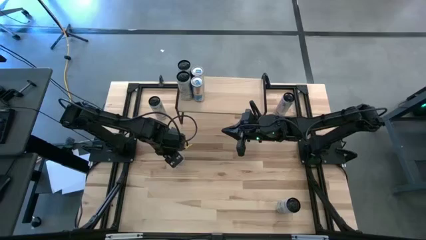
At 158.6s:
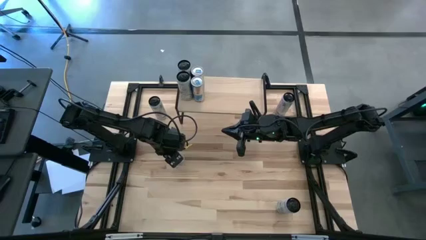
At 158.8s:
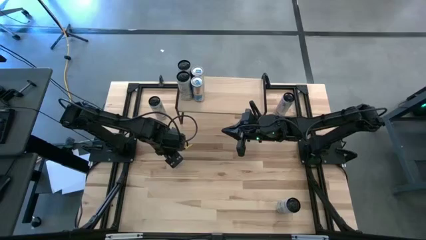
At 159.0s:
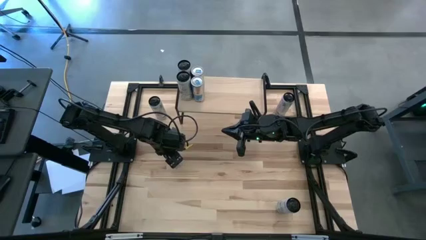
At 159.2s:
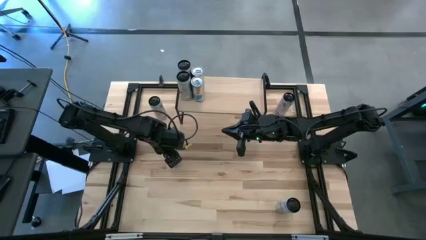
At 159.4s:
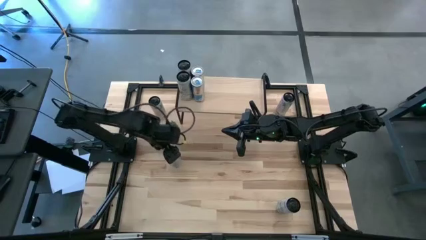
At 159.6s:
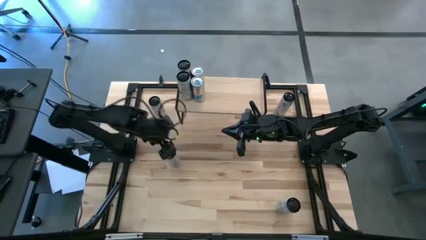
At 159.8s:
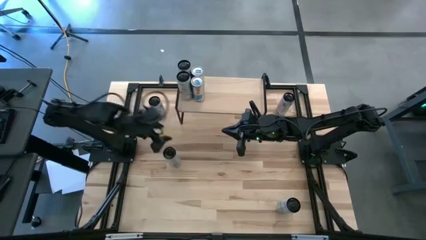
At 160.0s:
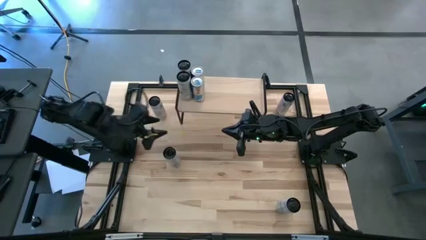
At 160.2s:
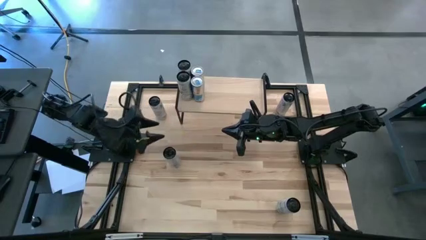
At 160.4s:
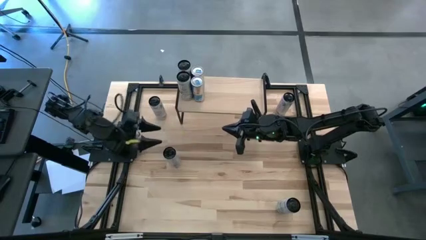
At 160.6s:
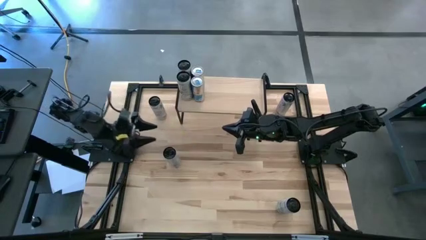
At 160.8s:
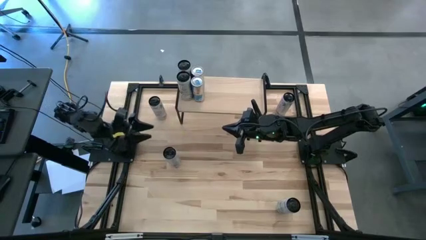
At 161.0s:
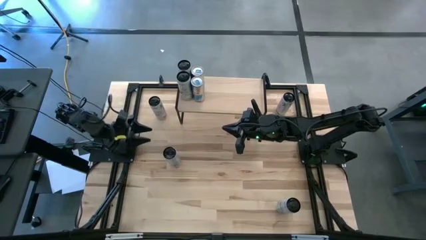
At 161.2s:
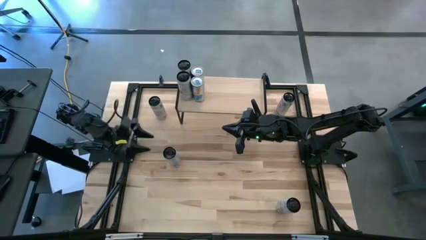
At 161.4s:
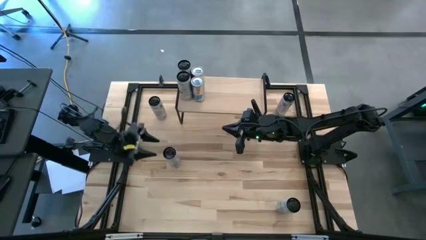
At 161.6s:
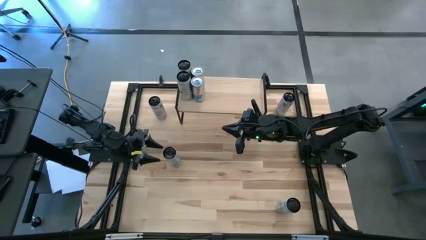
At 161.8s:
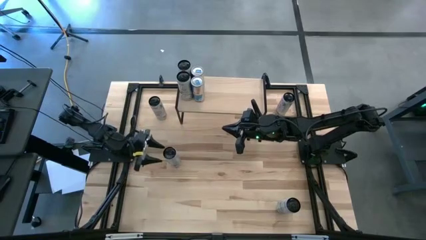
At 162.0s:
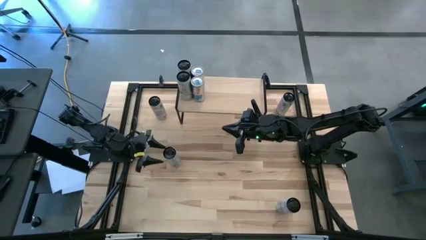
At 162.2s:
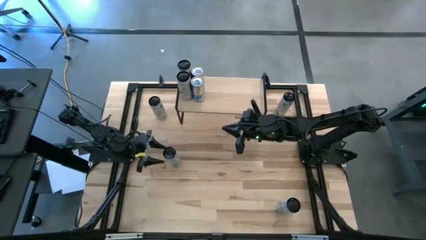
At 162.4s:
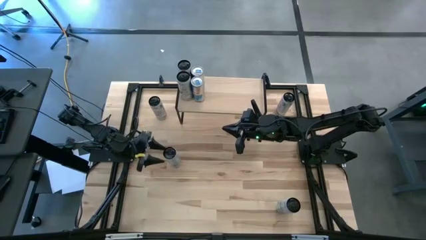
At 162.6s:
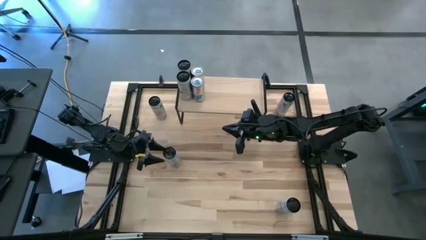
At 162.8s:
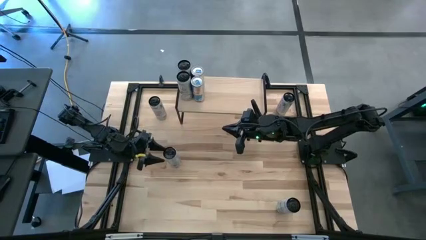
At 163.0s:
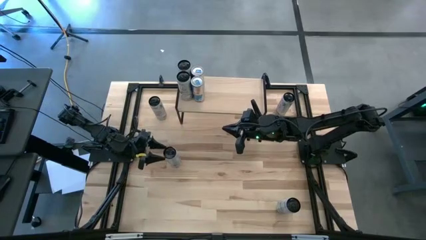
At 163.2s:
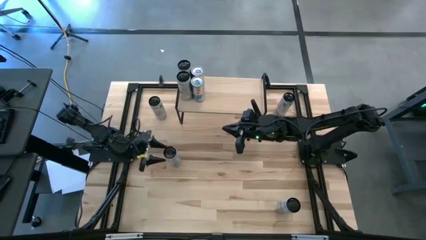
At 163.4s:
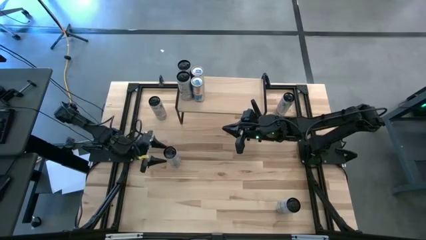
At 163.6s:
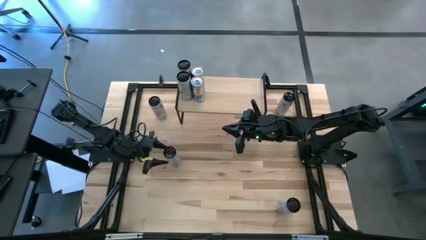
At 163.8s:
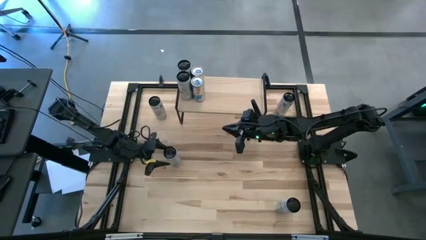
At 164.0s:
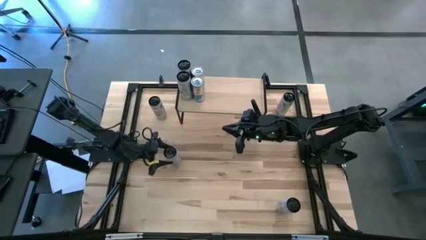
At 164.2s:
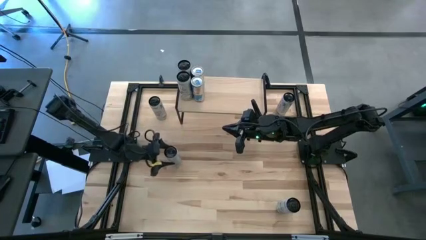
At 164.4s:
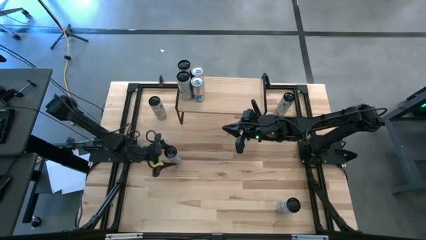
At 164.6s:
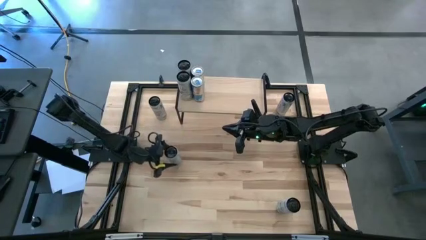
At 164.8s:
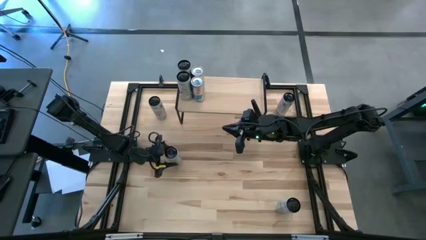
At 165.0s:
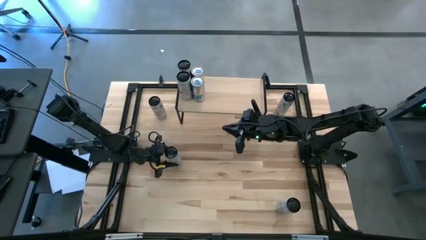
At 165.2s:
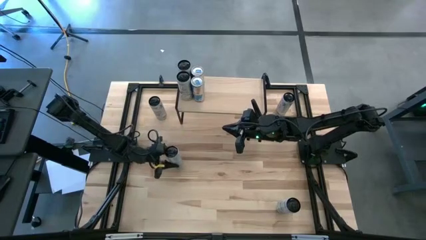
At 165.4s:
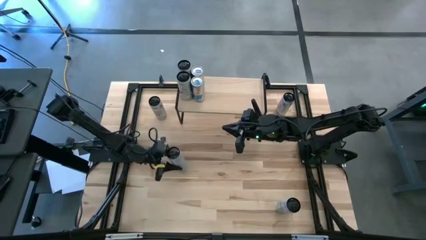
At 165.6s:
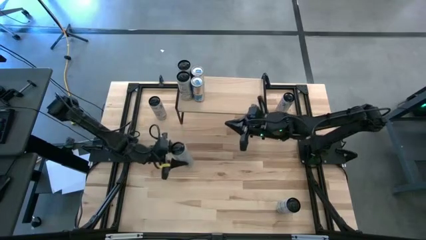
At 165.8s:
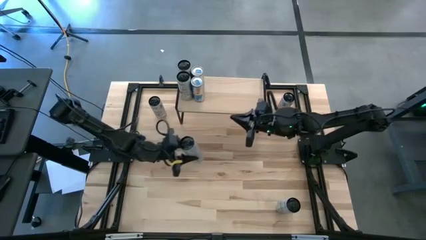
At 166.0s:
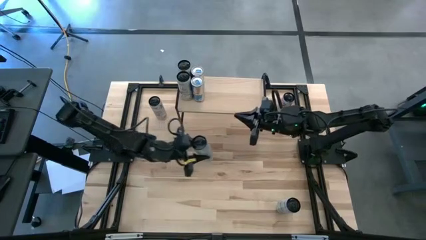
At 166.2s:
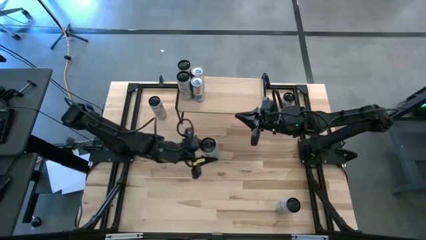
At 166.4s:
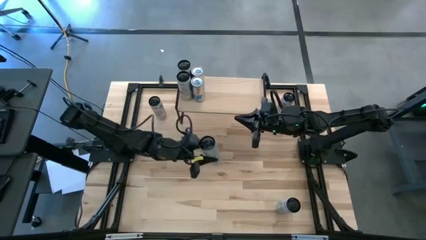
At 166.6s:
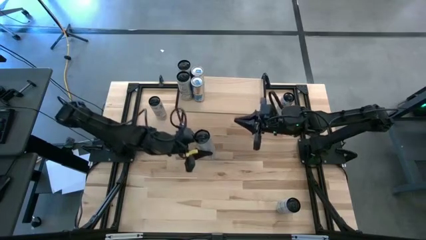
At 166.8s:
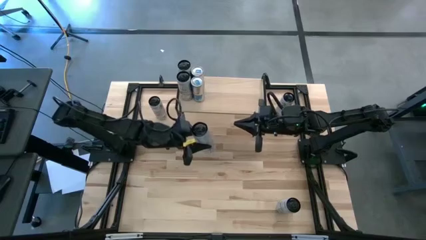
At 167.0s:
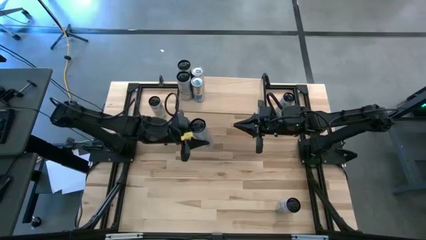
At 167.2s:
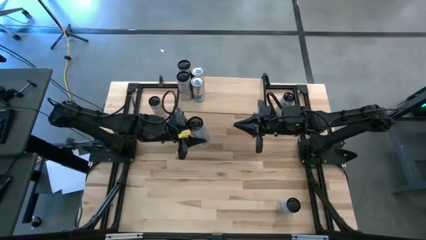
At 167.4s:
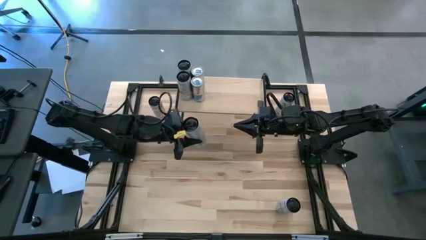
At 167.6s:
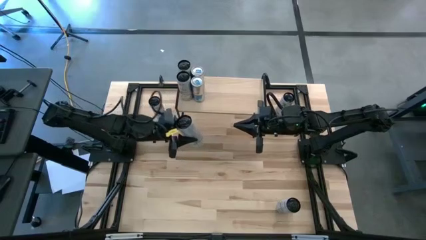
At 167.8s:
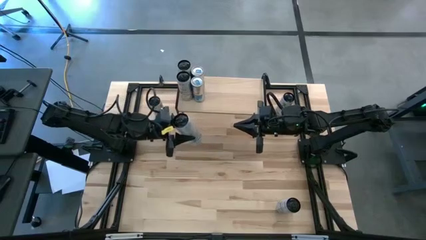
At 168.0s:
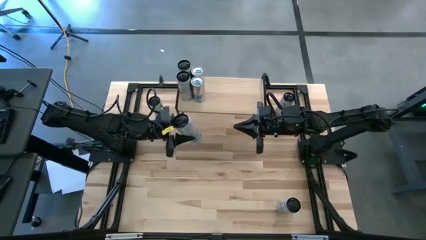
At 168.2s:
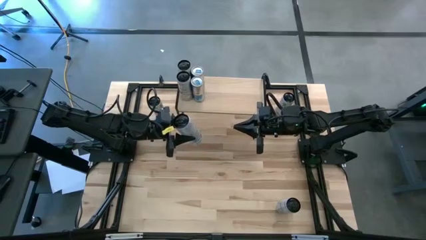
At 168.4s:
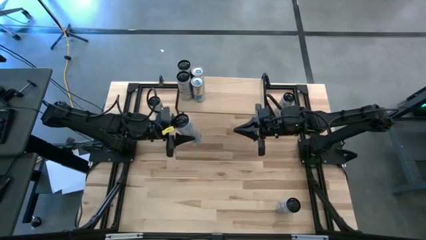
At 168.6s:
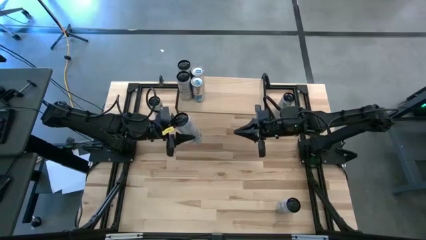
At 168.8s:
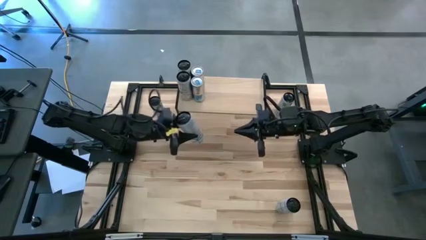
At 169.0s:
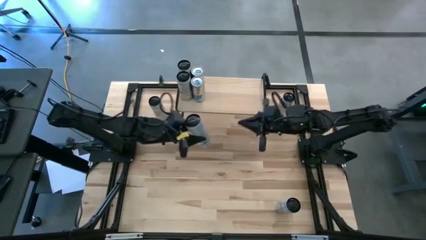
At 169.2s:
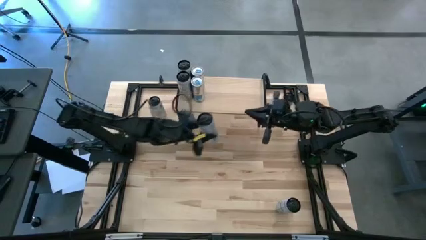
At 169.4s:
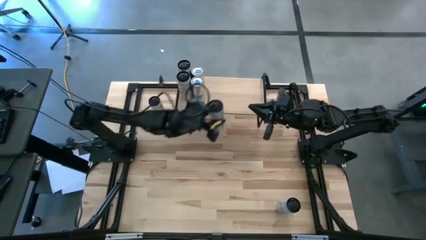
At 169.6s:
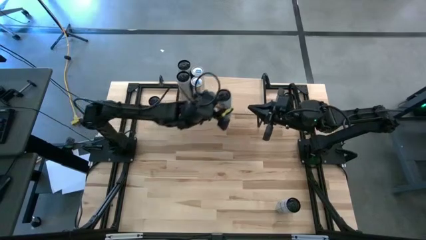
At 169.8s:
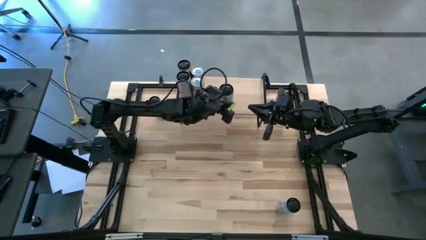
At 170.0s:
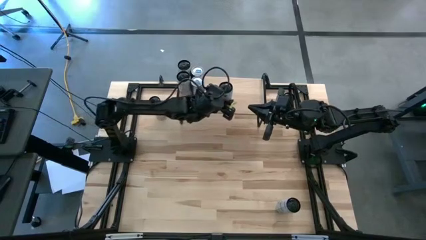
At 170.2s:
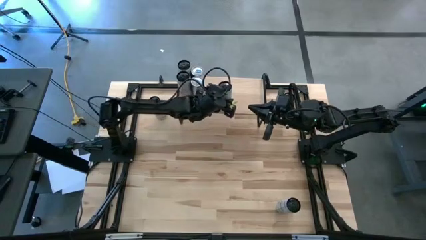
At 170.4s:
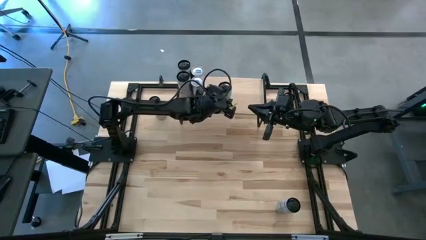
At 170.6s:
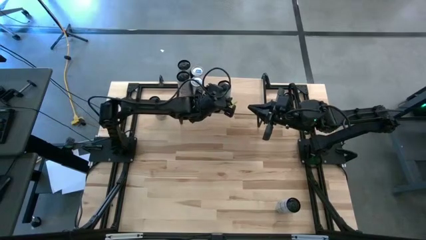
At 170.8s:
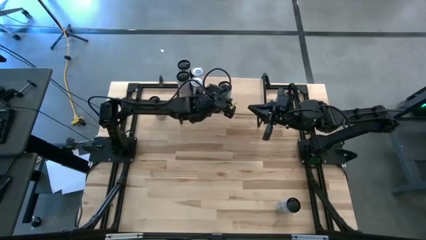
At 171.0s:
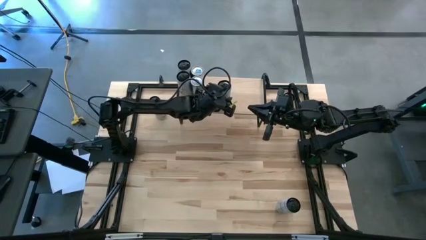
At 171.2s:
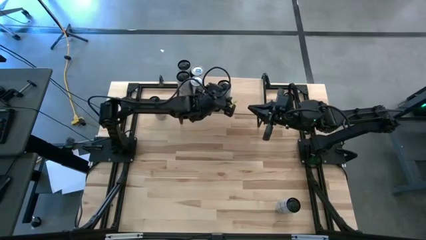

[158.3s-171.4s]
Task: Place canned beverage on shelf
Put the bottom left black soda can on the shelf
